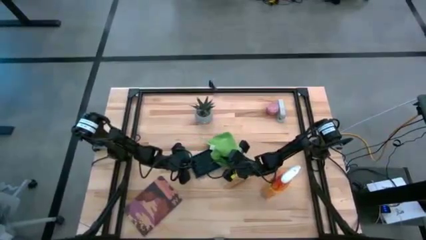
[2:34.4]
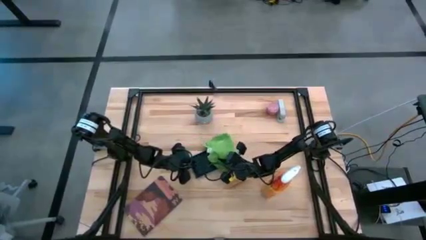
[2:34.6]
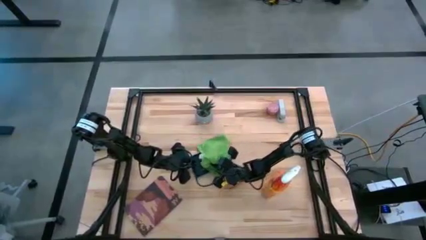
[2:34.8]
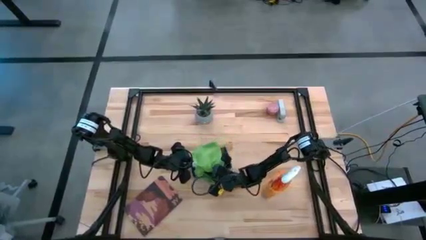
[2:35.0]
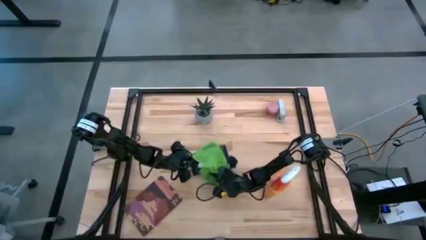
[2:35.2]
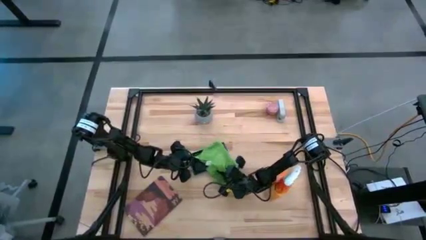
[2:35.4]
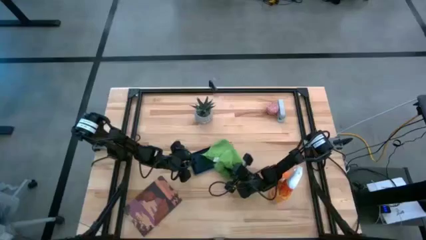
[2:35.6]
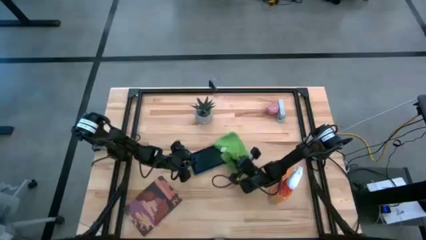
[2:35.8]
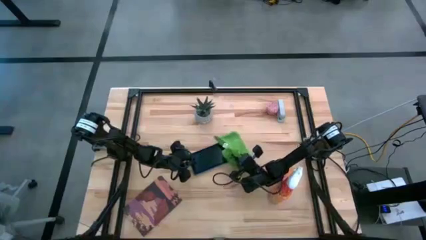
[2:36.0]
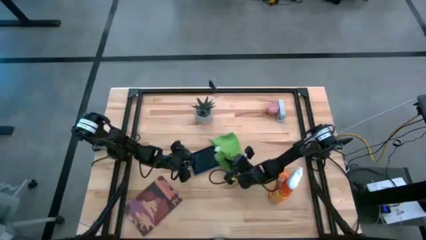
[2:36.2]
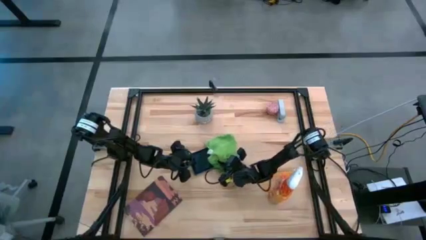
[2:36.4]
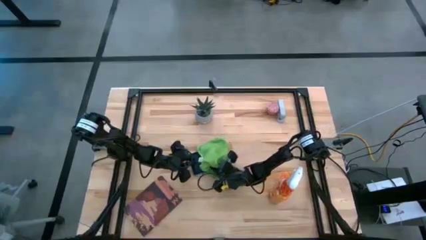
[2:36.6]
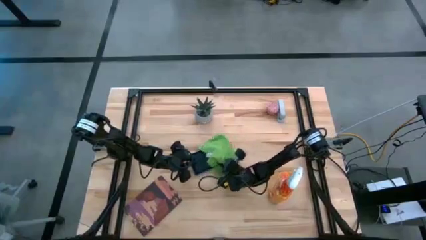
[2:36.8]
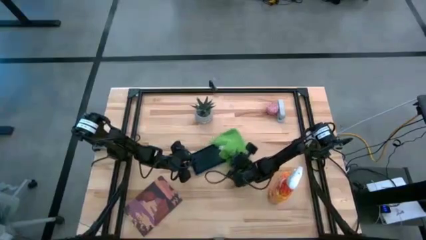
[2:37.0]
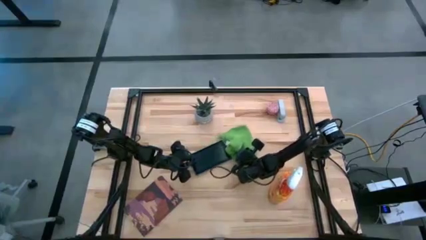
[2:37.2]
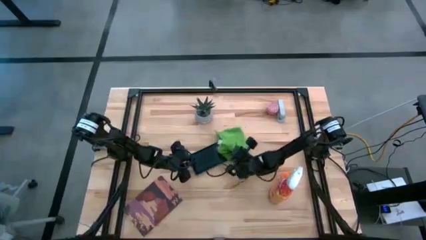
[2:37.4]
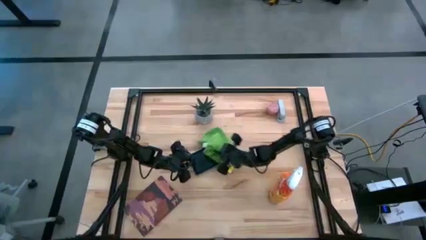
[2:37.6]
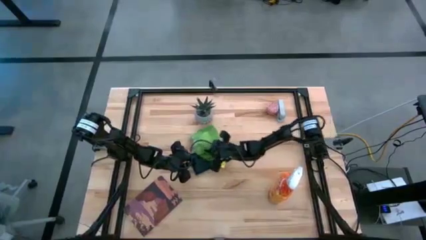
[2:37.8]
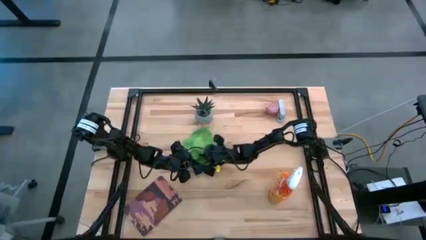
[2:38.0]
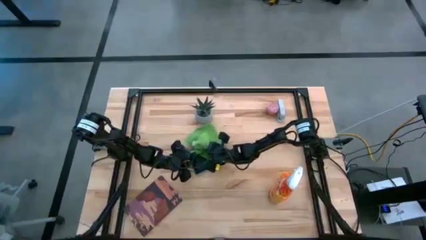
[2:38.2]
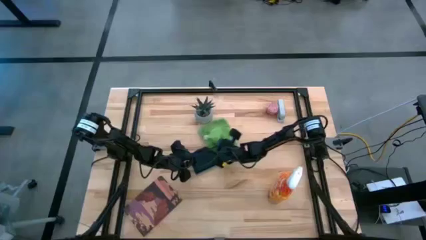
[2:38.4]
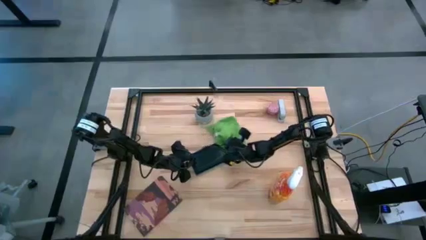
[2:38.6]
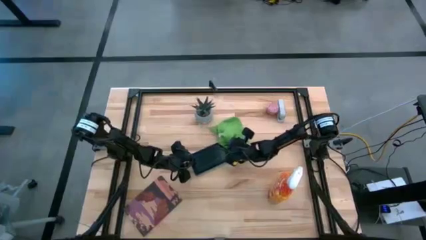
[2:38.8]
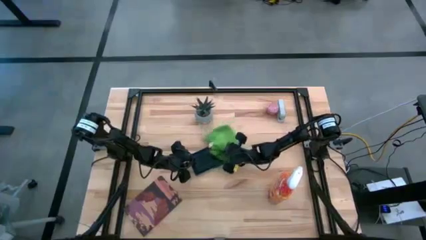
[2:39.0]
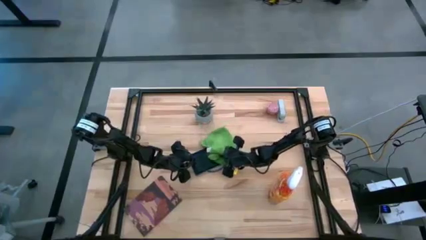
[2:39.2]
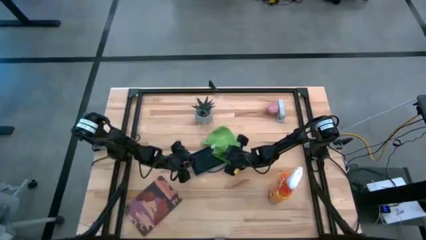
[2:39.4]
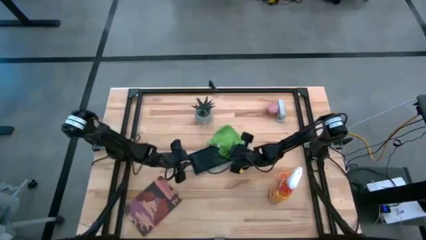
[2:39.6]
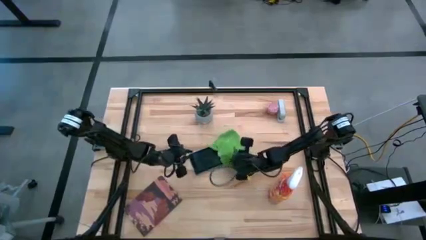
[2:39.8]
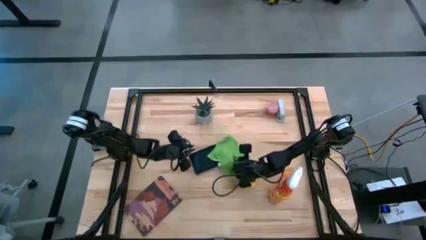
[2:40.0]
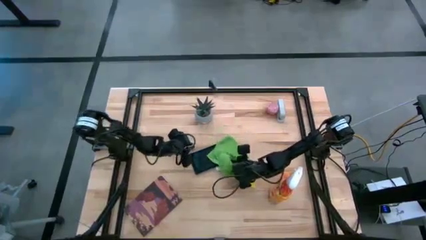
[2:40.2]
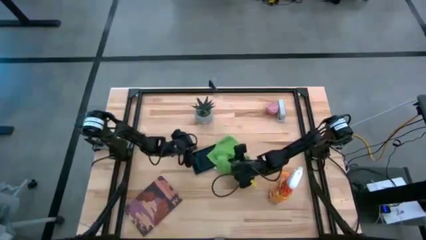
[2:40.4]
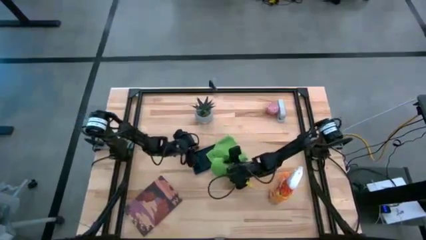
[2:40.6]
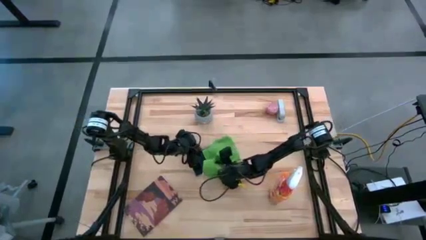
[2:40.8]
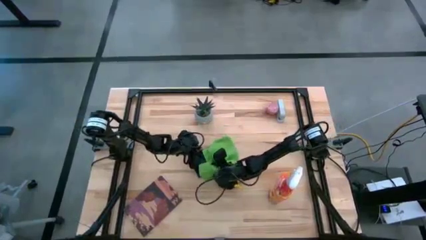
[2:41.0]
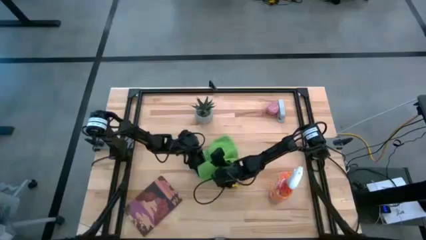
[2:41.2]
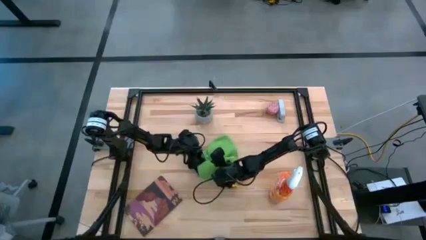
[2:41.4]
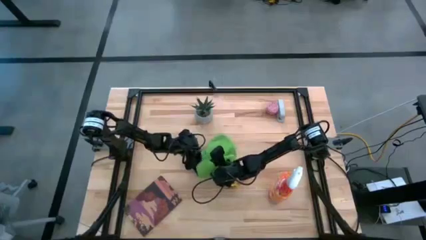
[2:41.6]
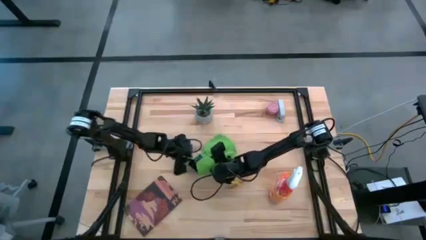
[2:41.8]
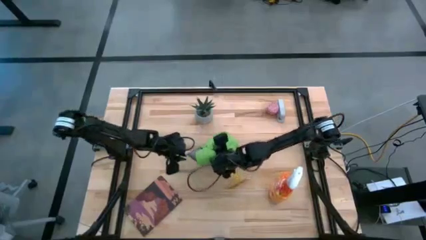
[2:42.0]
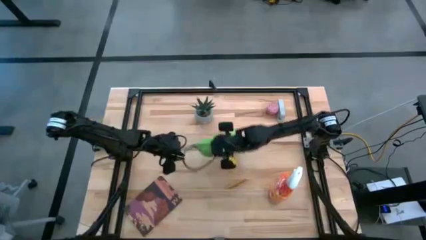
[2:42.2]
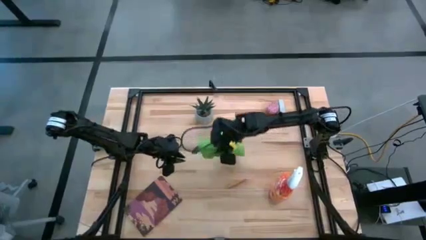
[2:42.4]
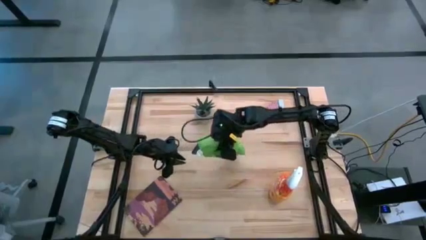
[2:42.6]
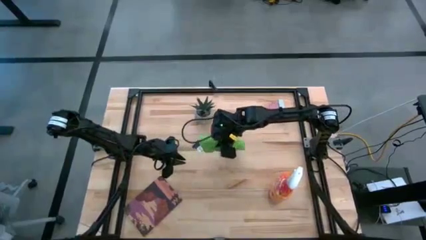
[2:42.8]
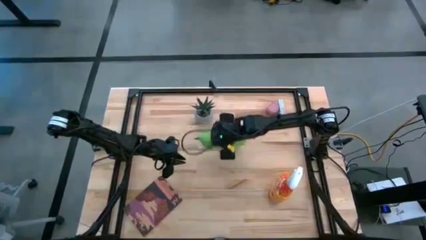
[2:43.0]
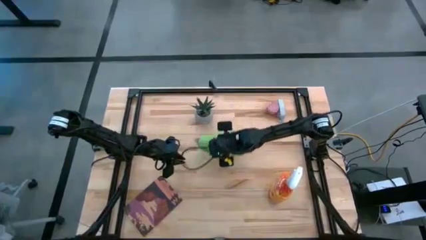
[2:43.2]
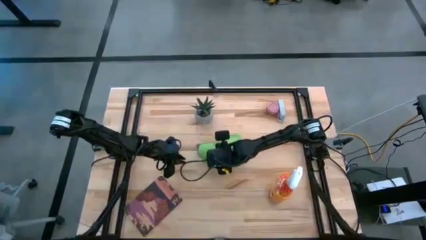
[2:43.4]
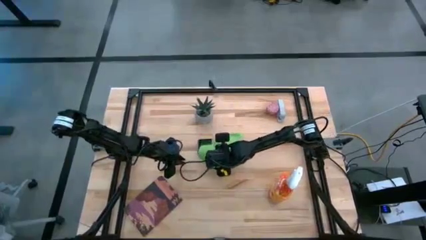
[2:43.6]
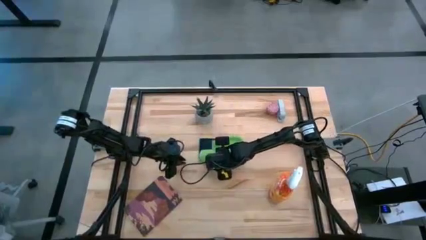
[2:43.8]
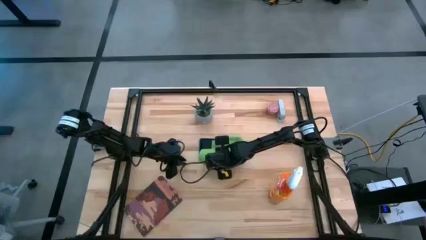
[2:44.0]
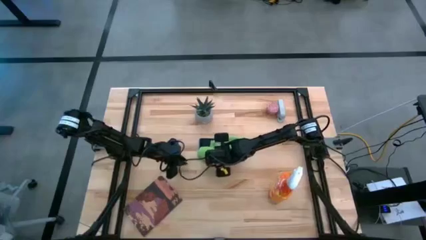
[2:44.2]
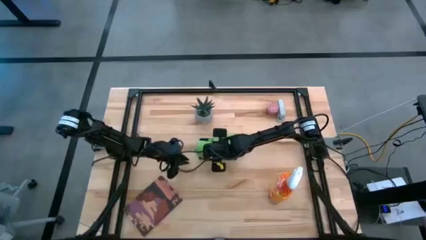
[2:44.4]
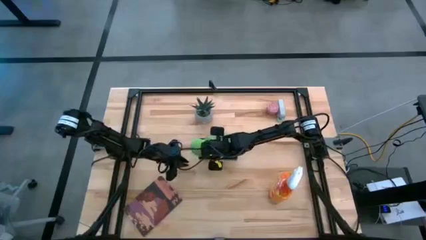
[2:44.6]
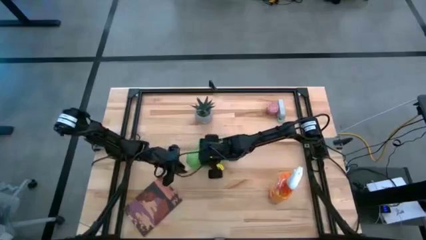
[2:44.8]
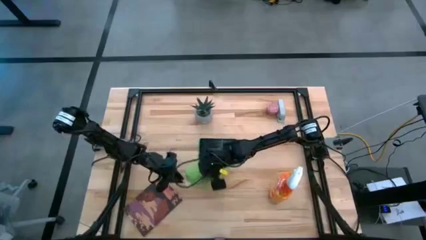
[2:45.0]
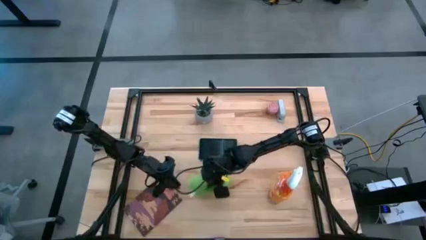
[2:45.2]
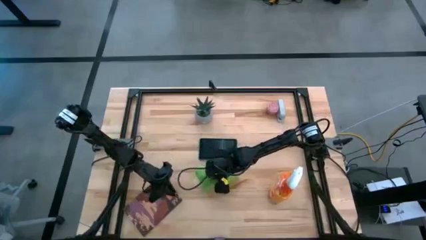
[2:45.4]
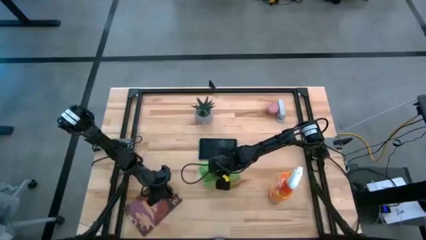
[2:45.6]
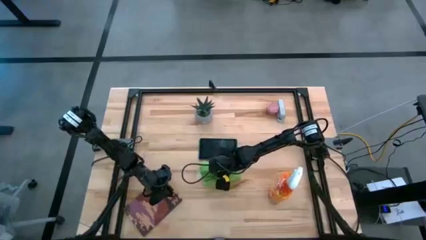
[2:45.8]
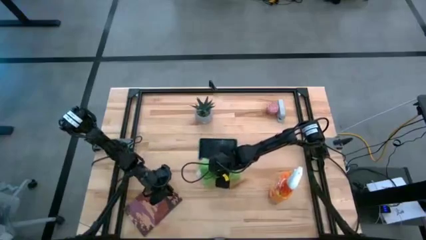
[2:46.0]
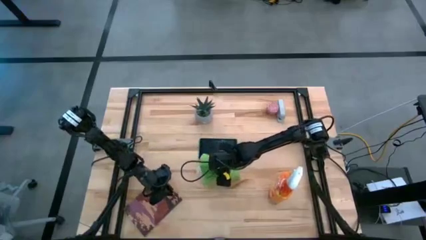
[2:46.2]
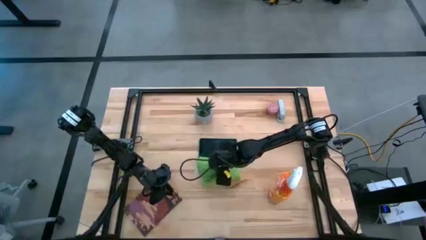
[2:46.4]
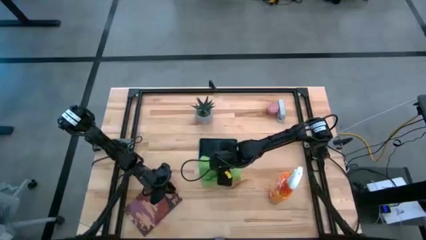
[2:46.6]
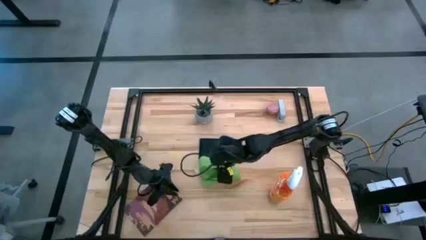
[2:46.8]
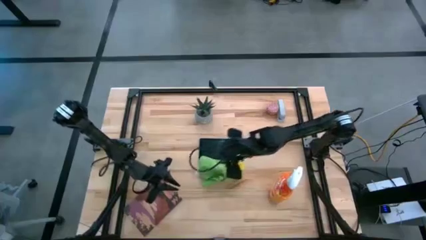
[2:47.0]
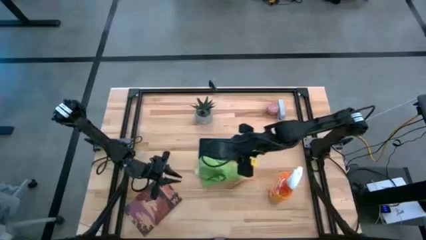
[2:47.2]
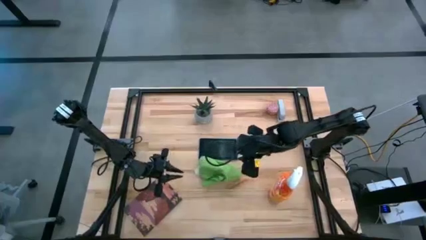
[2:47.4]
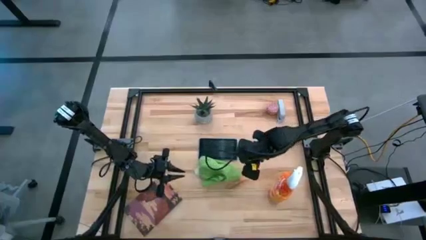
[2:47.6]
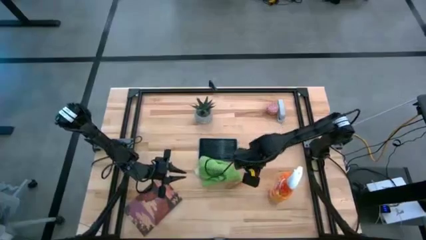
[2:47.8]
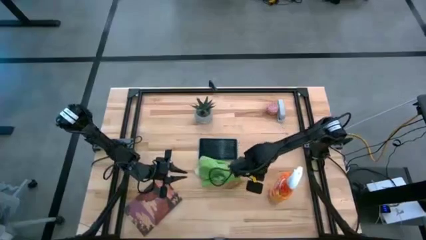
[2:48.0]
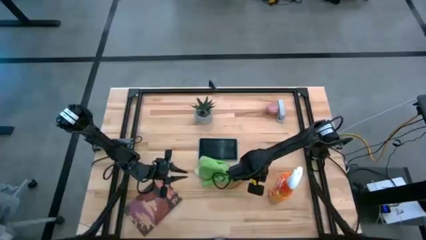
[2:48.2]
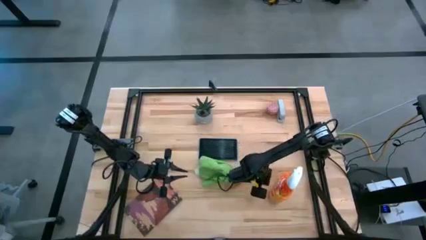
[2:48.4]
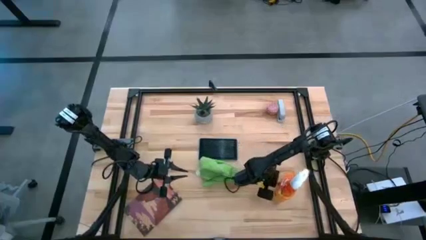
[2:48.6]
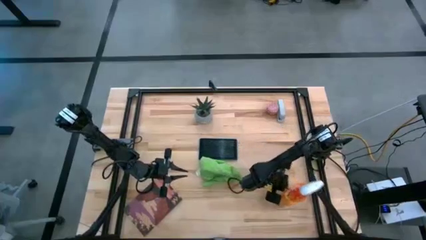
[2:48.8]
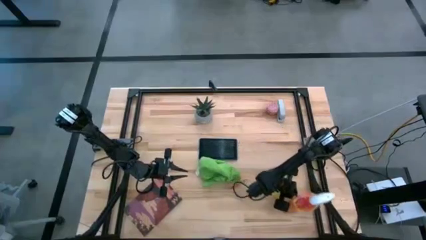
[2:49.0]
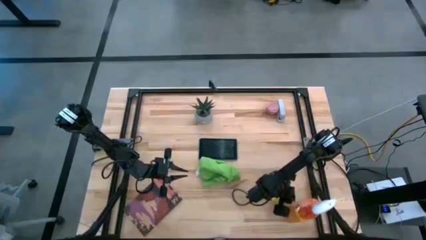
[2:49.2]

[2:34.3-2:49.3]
Task: Apply microfiber cloth
Wipe the front of the tablet with the microfiber cloth

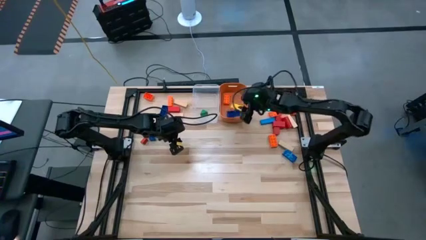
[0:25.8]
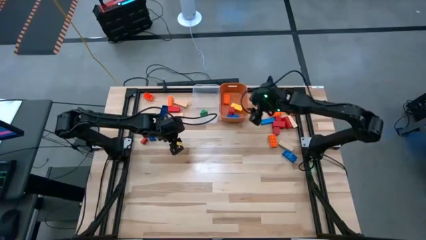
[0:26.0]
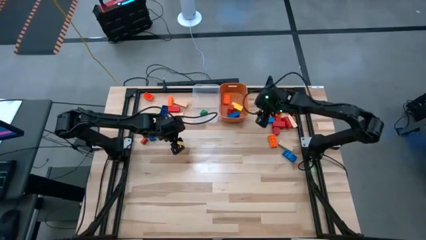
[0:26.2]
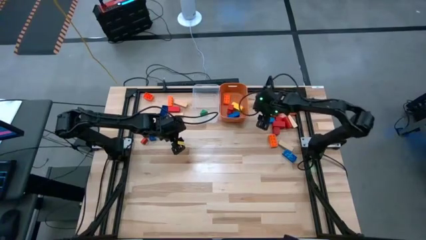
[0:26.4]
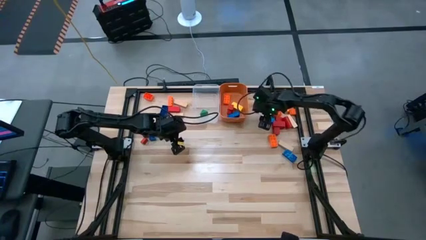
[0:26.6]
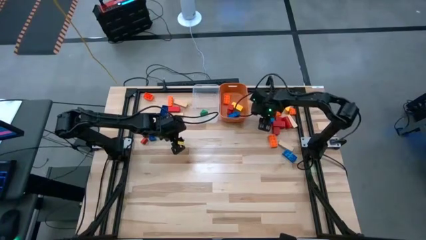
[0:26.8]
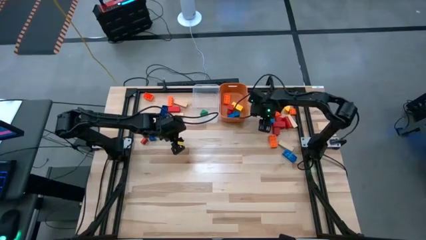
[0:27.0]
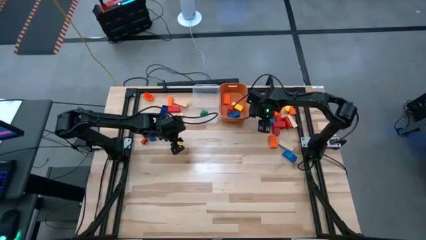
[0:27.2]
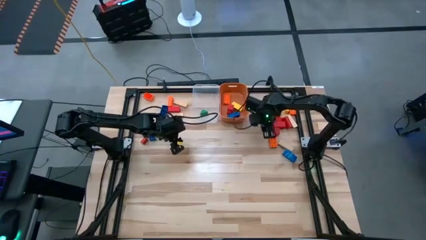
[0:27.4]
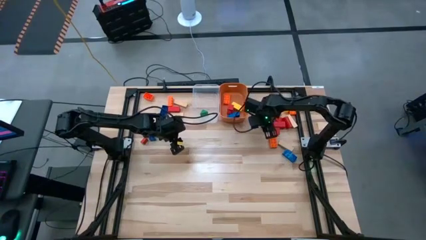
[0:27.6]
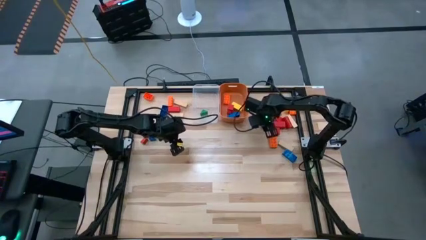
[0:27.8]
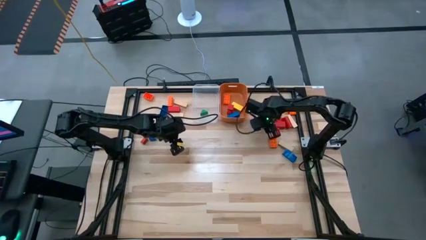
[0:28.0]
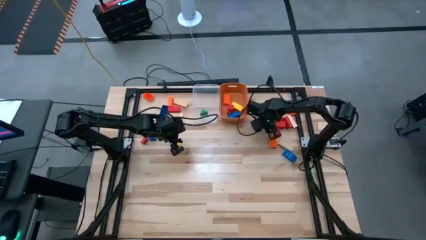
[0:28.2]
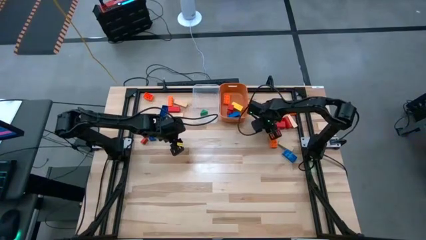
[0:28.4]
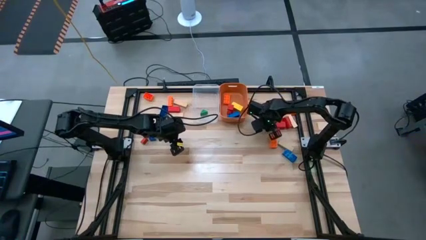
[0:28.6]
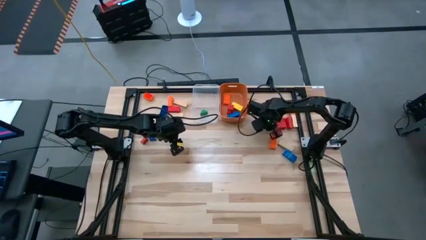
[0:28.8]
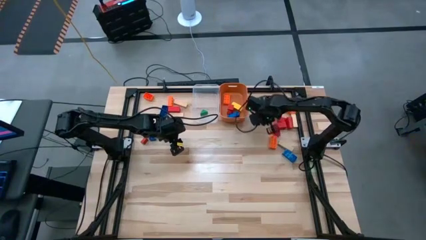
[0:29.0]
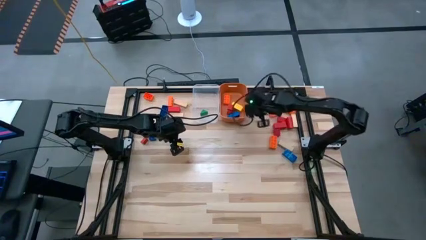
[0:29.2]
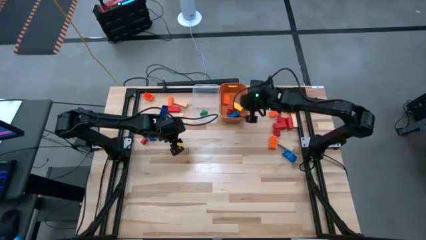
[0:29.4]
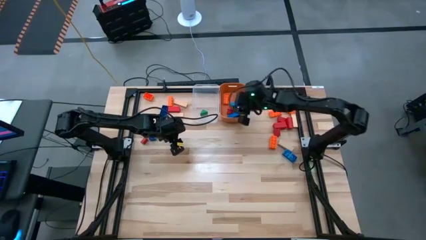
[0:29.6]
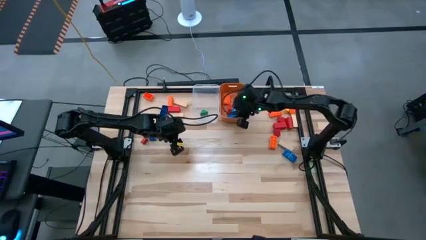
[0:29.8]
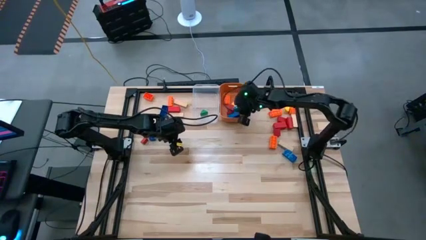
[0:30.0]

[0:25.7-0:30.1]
Task: Sort blocks by size
Put the blue rectangle block into the orange bin
